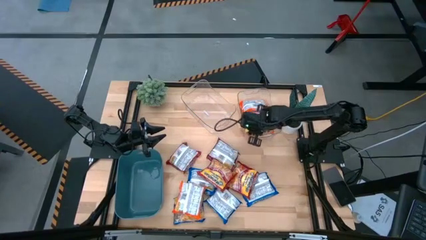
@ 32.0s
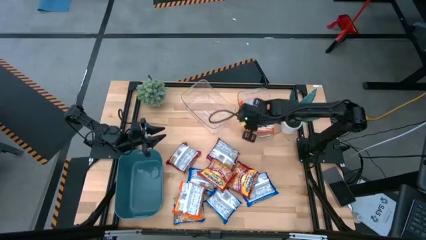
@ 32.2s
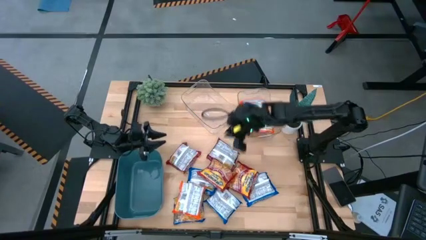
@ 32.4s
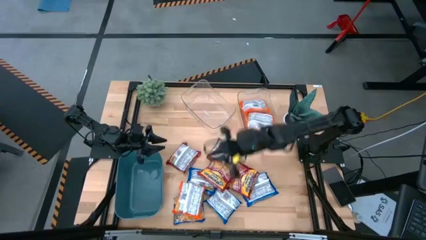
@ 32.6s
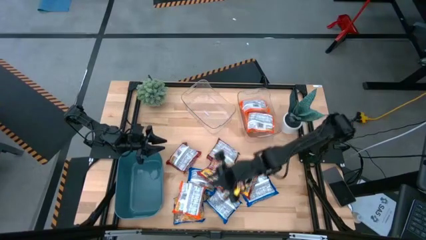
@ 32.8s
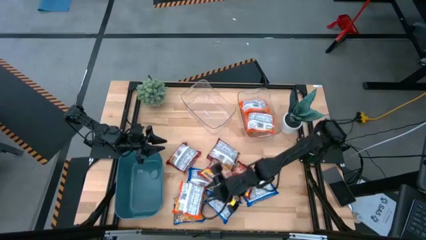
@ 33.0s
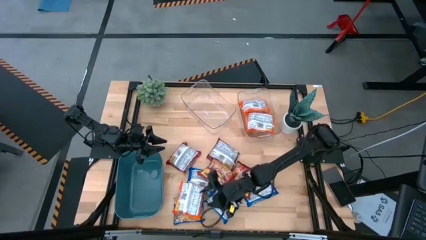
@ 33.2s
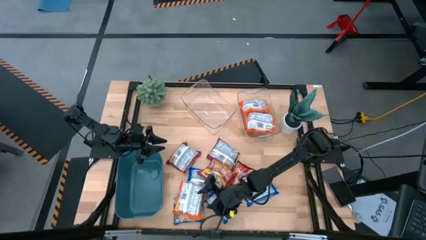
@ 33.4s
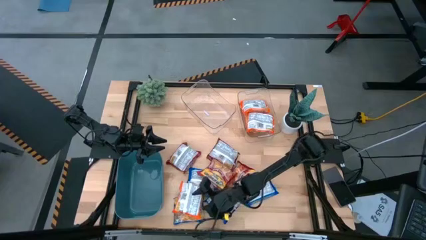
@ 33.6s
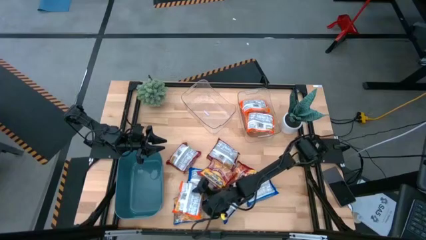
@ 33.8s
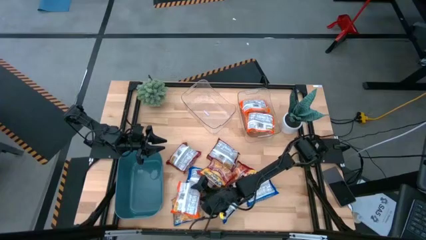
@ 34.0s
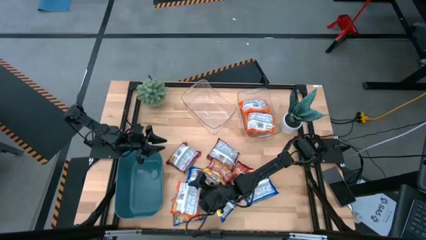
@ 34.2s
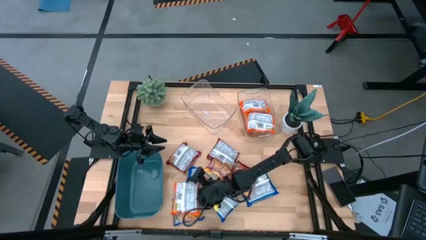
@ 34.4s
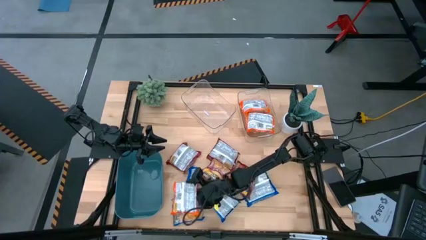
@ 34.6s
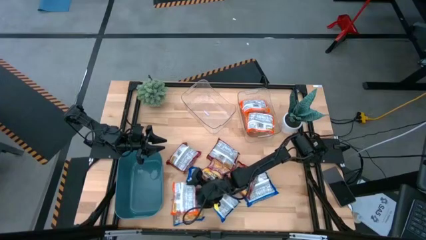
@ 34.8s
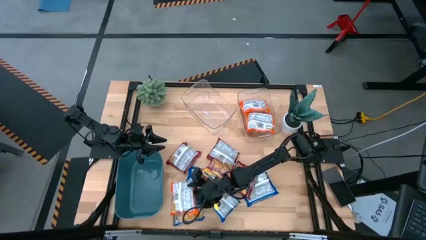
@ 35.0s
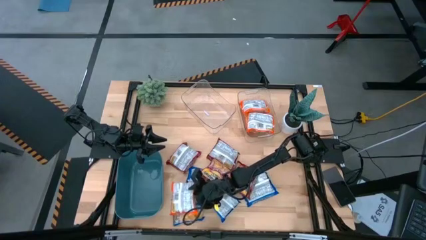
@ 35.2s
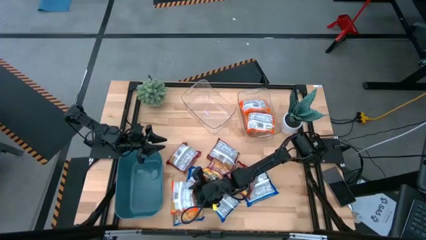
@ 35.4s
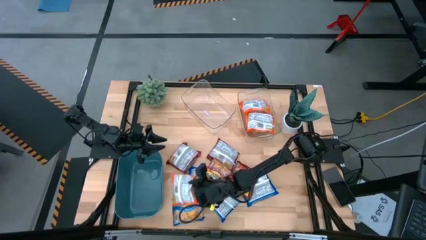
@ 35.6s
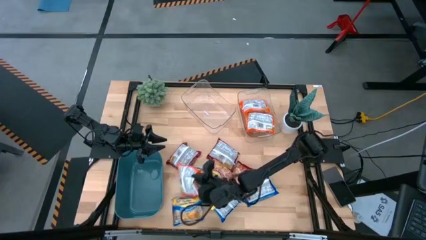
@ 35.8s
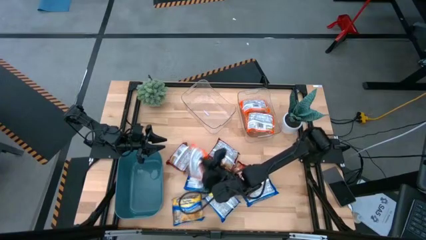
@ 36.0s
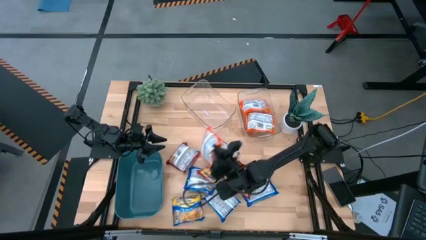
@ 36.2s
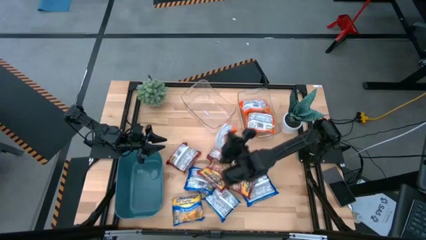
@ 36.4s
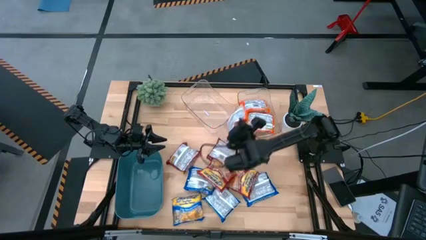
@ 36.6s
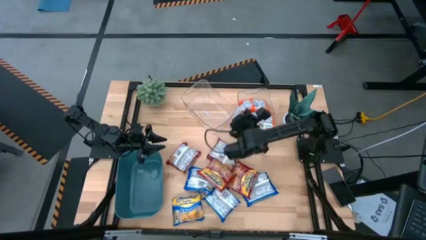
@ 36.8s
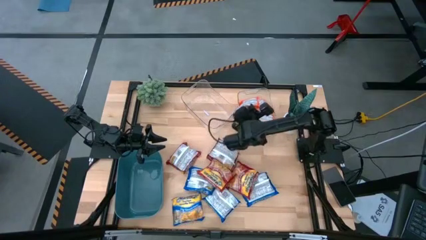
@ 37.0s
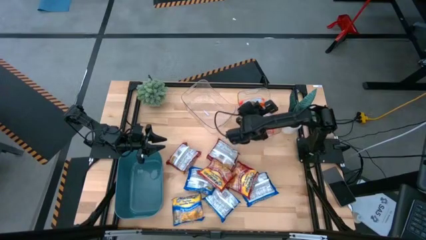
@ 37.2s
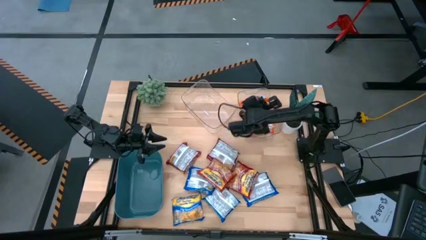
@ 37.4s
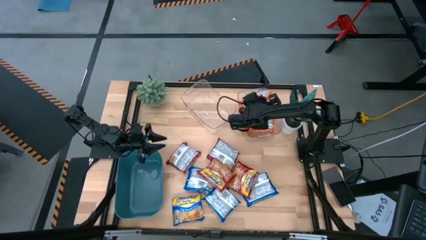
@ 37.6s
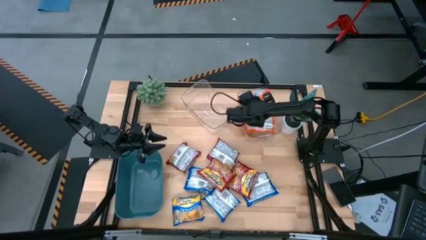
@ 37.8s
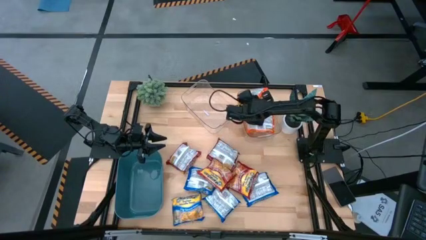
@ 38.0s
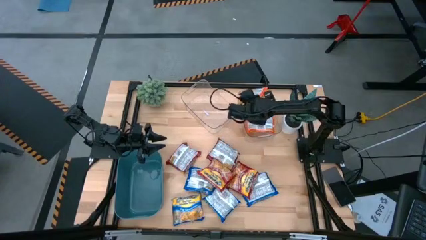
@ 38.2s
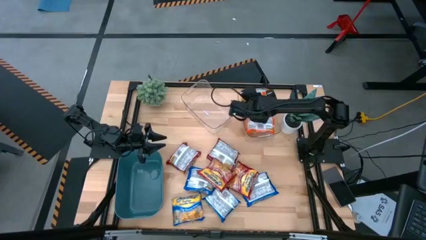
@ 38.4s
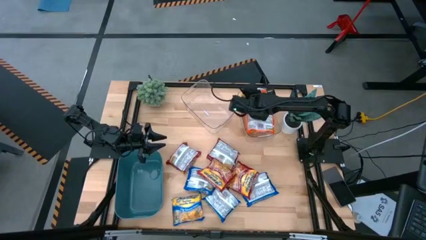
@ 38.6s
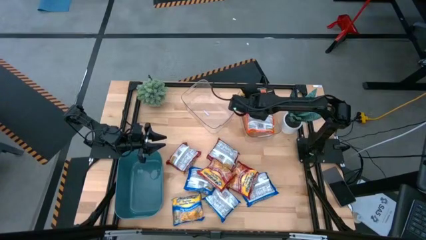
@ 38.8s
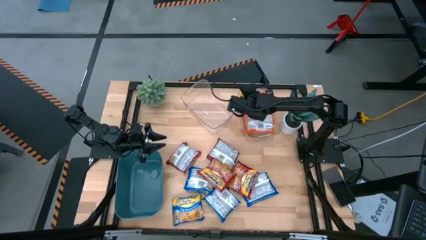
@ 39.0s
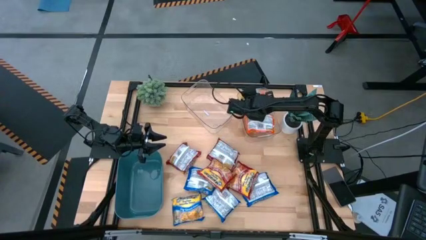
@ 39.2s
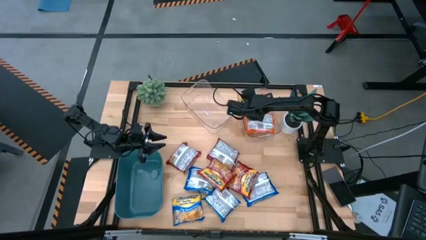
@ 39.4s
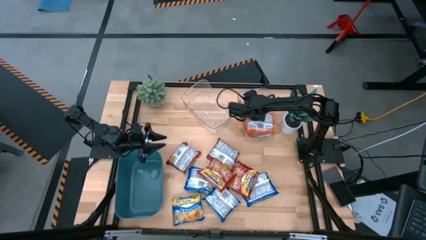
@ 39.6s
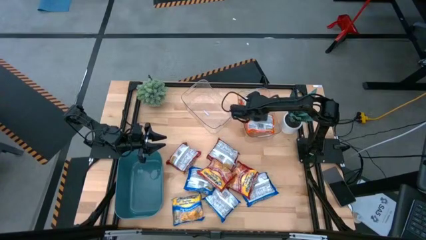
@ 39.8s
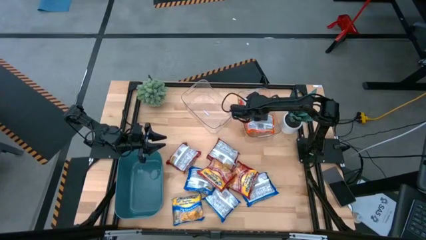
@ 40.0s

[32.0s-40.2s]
Task: Sort Maruchan noodles
Put the orange noodle pack into the right transparent bin

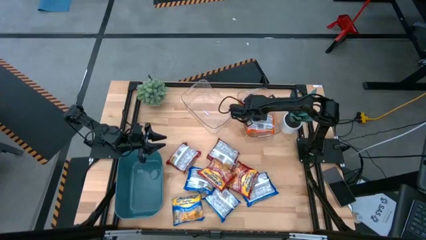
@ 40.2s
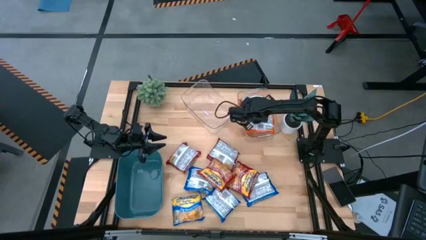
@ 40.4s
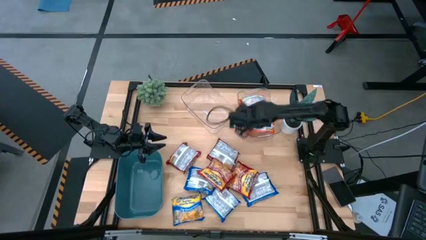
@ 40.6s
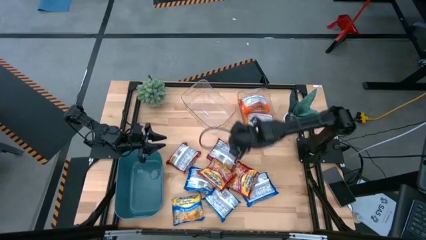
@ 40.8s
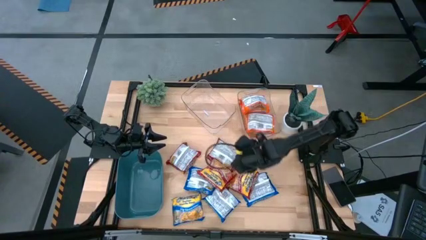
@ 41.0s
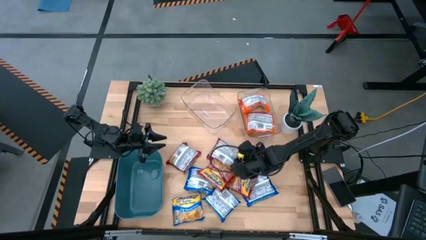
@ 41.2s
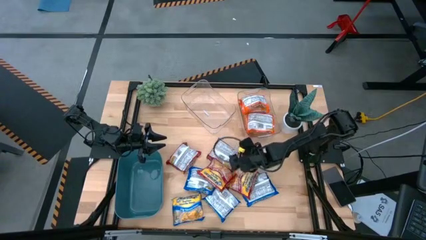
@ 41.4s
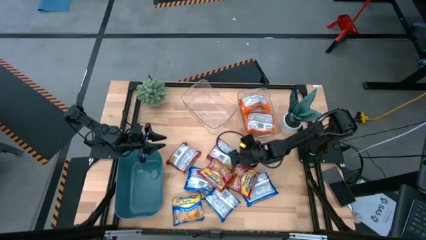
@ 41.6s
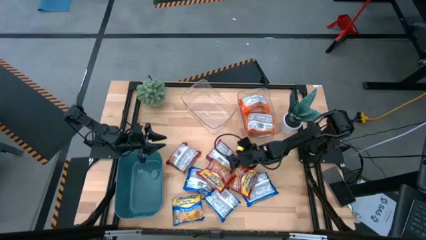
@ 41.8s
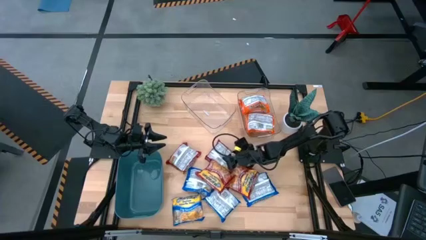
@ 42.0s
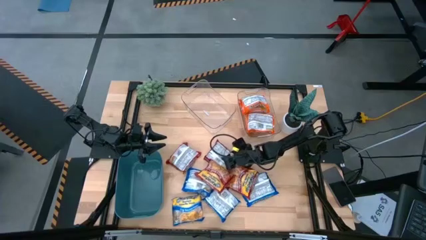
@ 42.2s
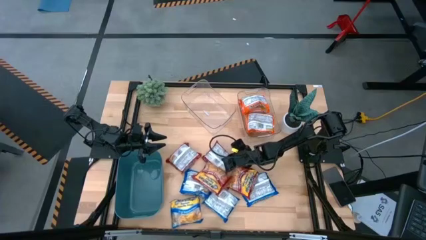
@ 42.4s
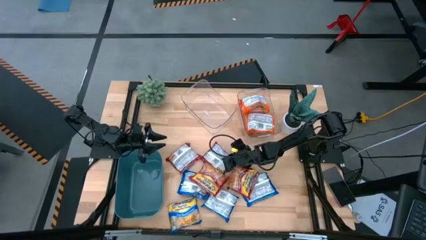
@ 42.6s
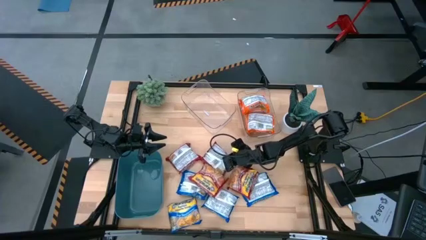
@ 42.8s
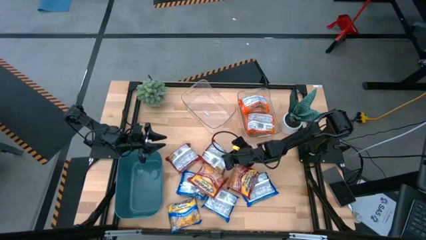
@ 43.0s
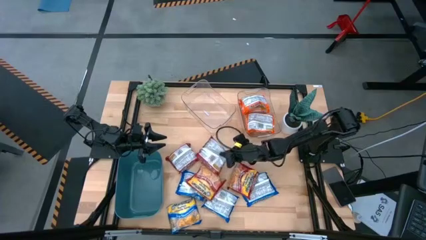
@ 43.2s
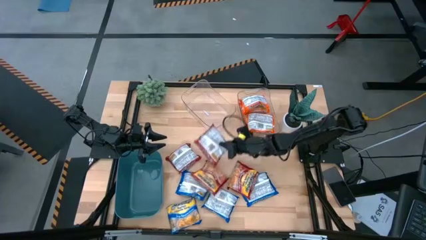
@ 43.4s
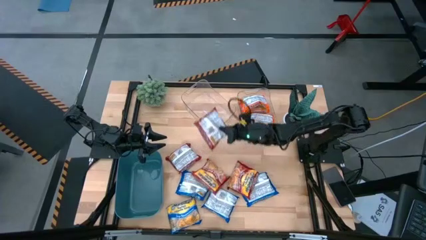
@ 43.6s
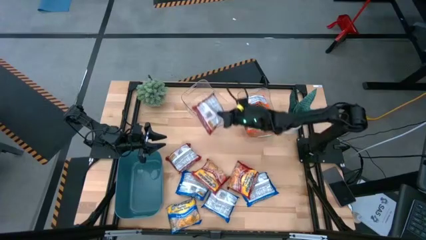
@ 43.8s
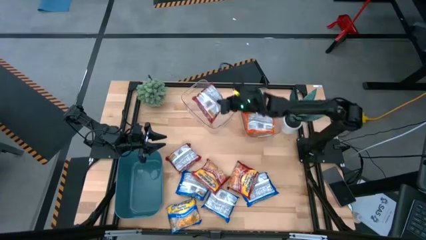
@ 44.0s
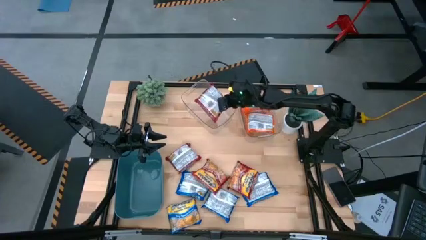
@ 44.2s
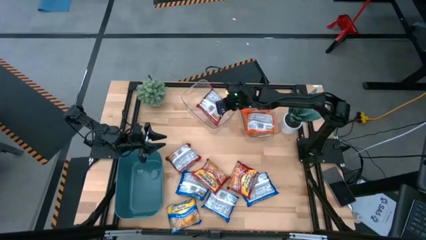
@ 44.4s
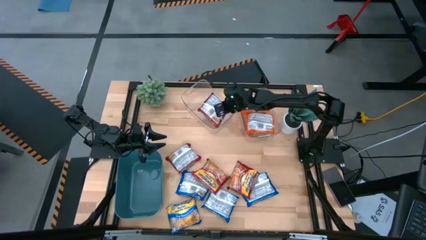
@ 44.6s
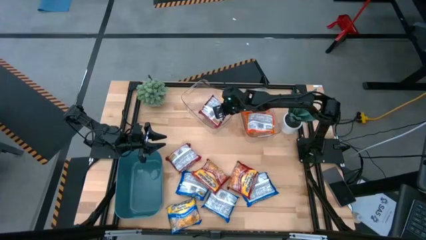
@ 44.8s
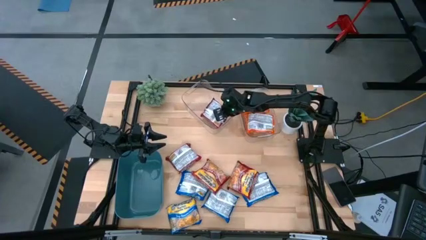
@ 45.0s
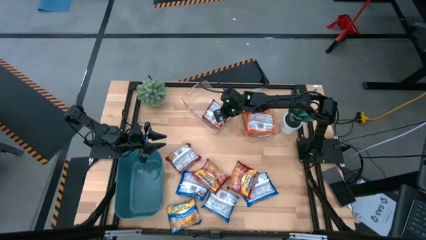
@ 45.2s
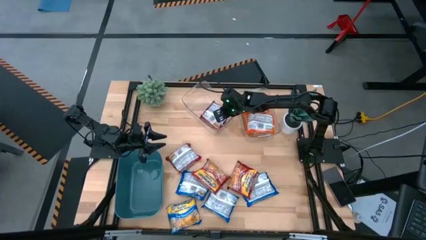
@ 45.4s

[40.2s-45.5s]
Put the red noodle pack into the left transparent bin

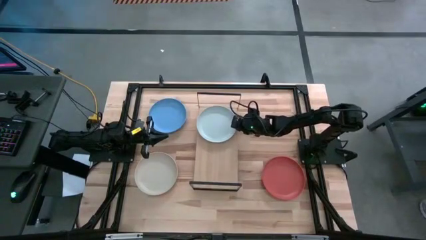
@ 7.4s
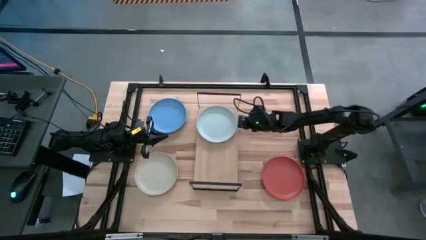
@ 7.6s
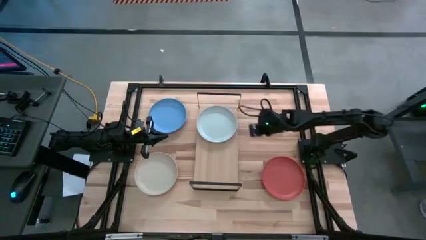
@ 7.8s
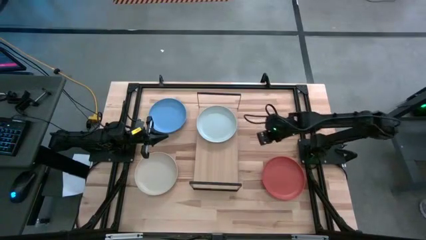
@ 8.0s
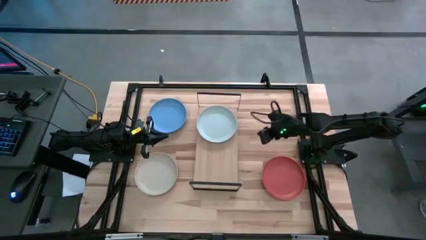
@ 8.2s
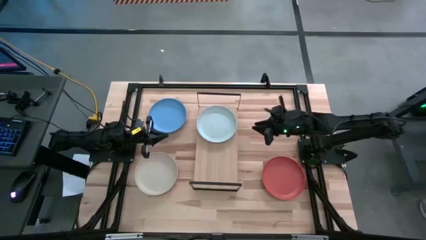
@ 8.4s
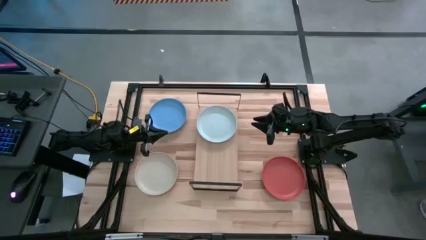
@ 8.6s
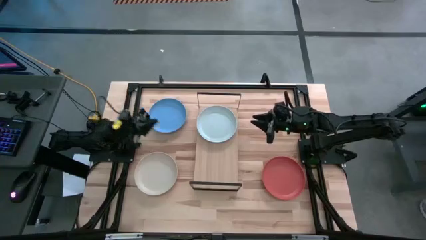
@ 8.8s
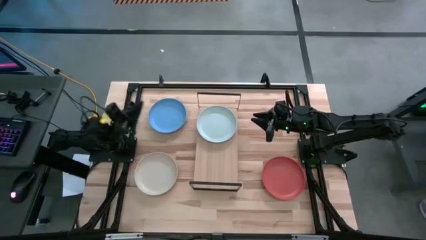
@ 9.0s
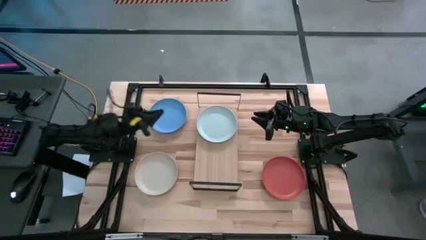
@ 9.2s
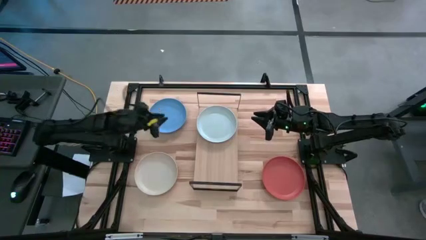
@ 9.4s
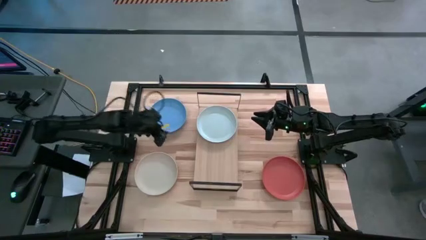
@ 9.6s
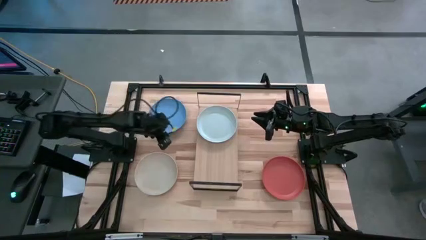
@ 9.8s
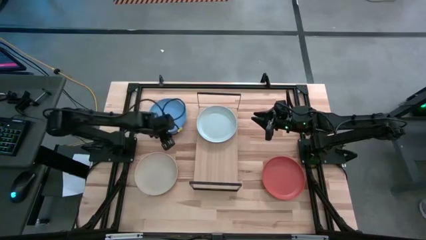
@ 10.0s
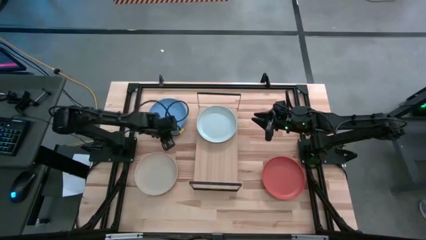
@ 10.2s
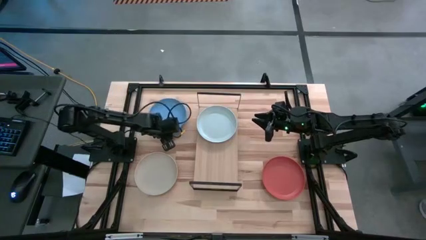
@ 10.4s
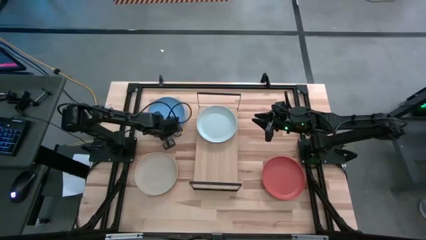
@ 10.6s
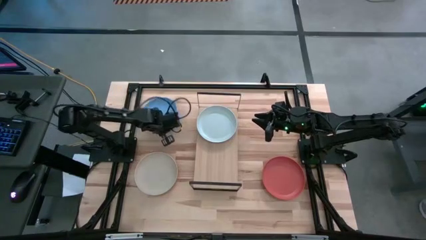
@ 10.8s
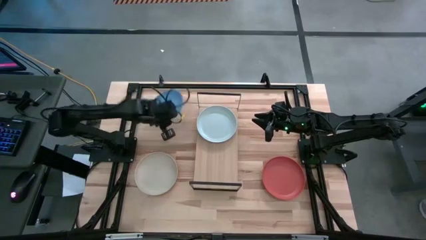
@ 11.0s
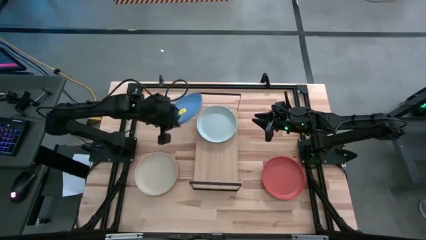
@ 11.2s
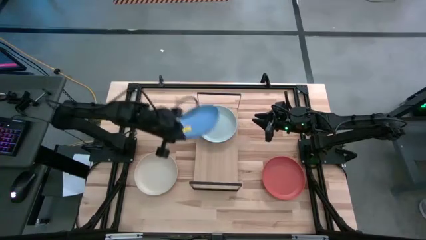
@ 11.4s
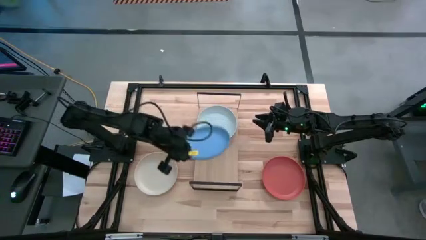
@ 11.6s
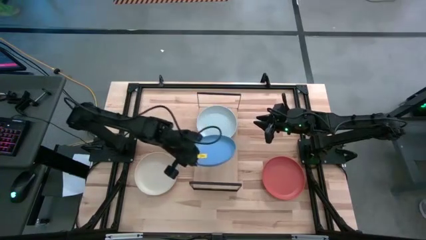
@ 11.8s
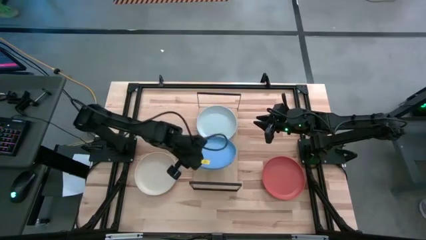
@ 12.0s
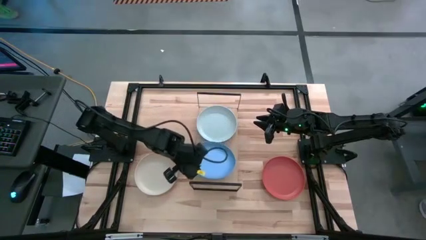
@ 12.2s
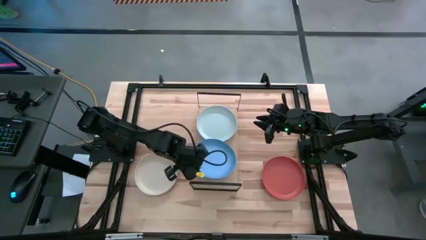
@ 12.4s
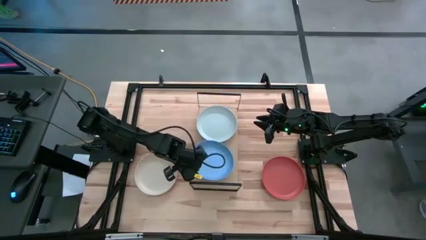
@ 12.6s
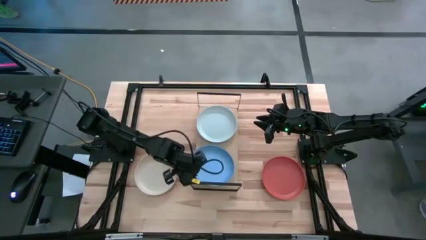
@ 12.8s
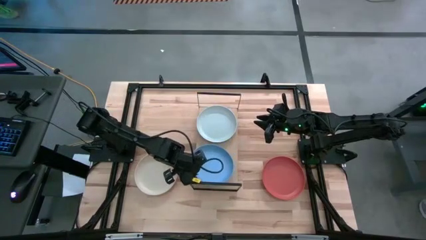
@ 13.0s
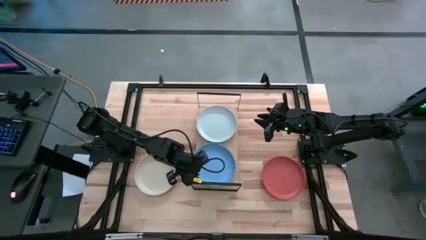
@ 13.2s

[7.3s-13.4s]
Task: Place and stack plates onto a shelf
Put the blue plate on the shelf
